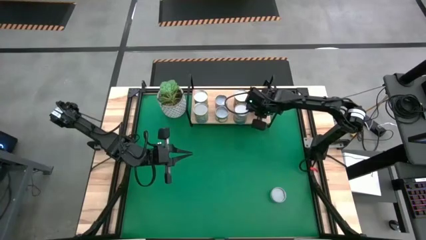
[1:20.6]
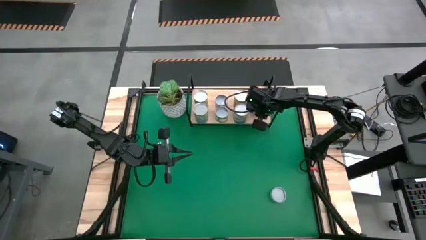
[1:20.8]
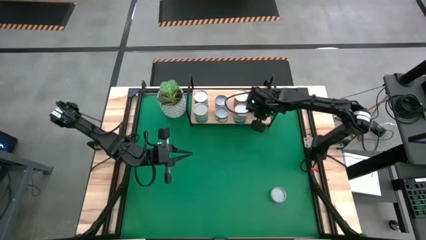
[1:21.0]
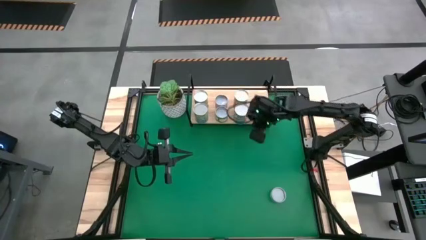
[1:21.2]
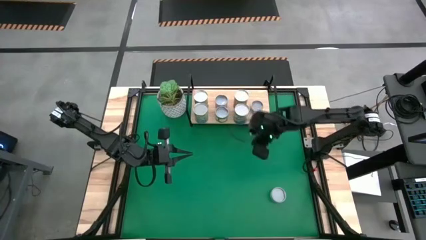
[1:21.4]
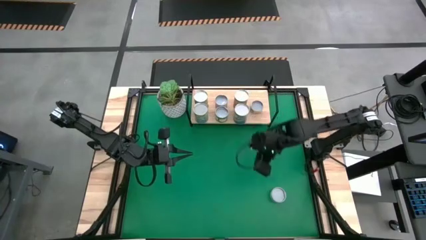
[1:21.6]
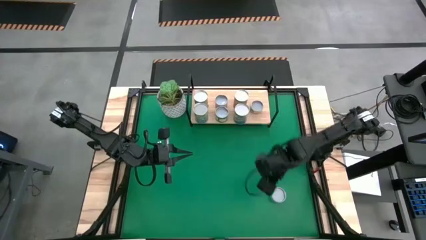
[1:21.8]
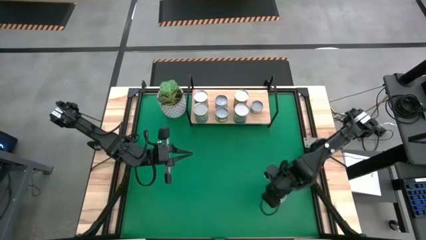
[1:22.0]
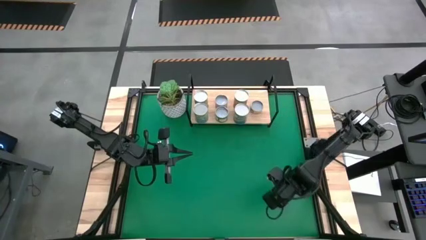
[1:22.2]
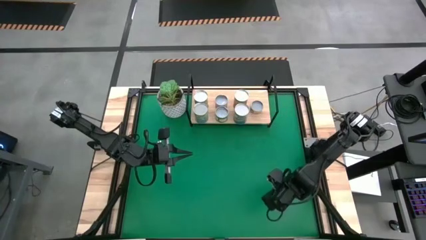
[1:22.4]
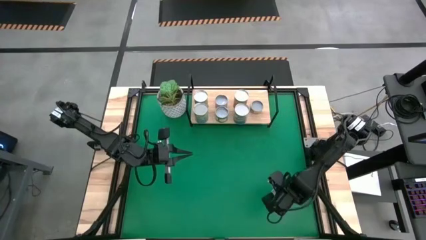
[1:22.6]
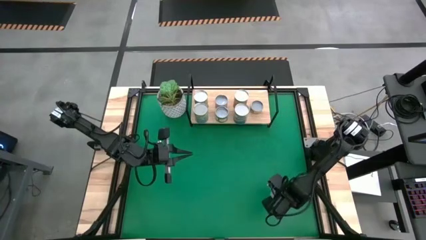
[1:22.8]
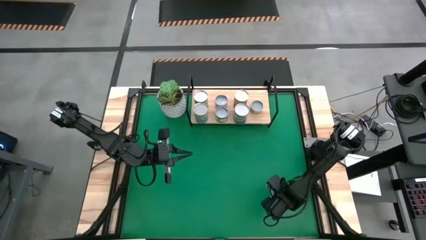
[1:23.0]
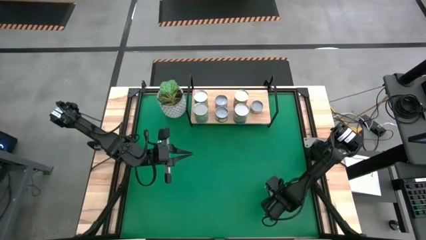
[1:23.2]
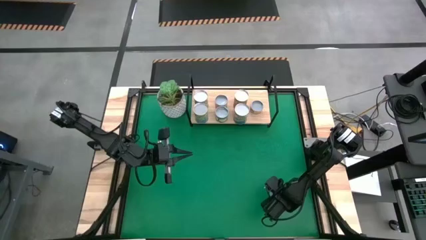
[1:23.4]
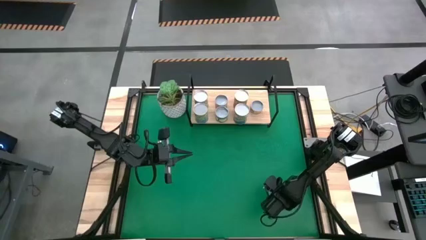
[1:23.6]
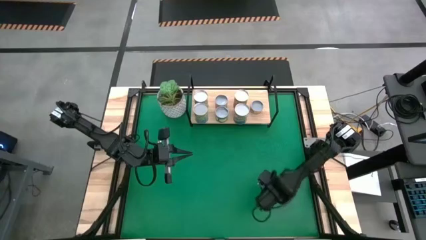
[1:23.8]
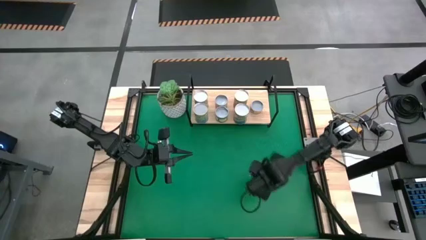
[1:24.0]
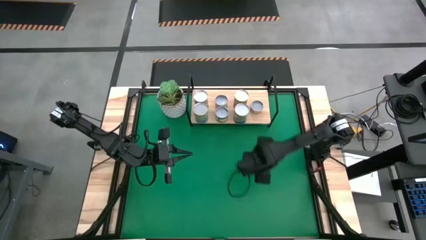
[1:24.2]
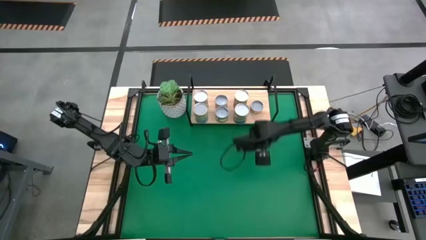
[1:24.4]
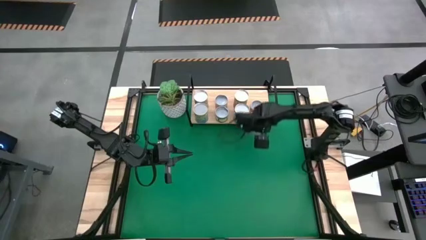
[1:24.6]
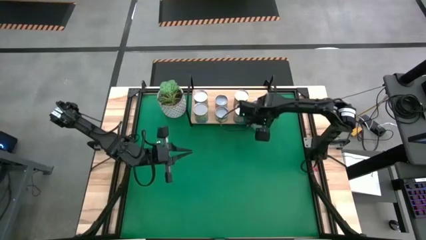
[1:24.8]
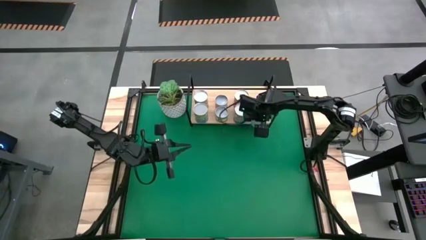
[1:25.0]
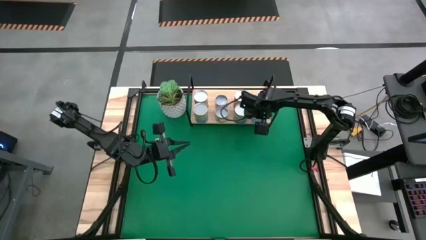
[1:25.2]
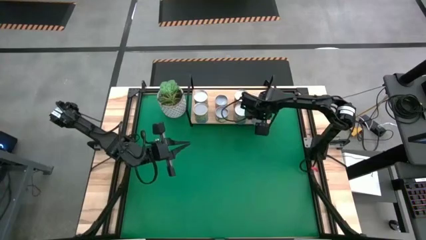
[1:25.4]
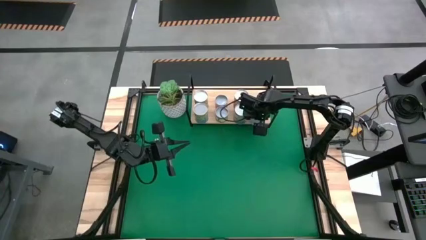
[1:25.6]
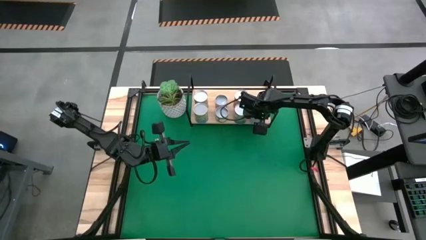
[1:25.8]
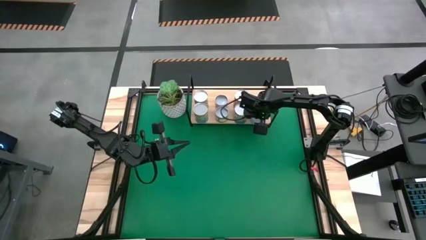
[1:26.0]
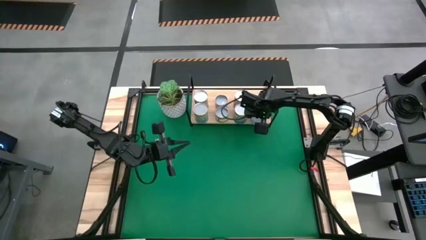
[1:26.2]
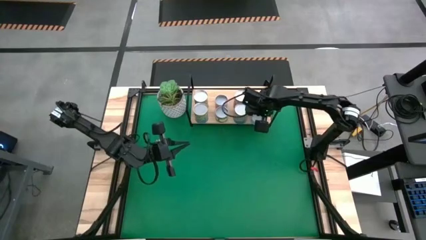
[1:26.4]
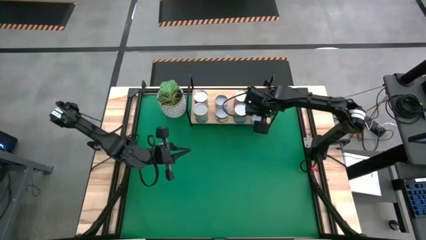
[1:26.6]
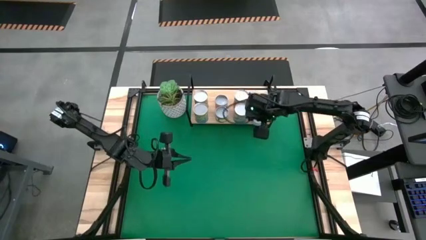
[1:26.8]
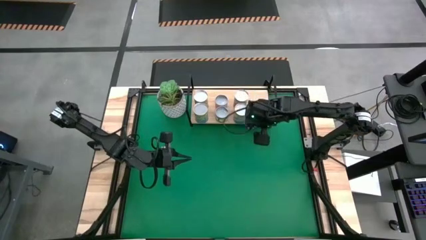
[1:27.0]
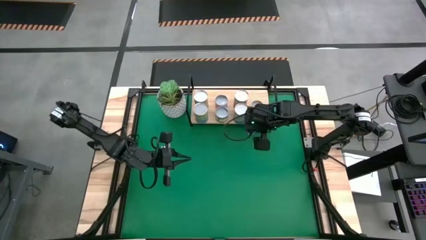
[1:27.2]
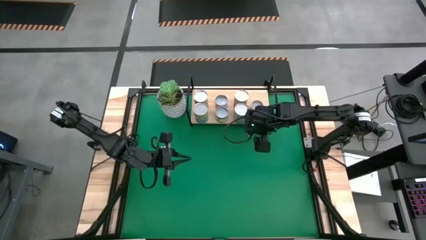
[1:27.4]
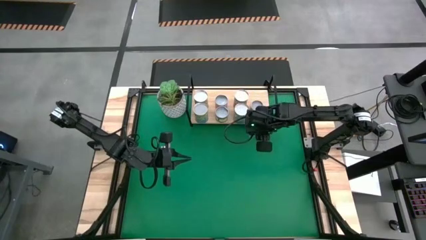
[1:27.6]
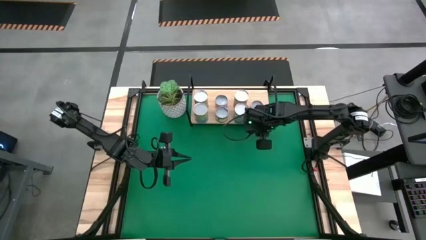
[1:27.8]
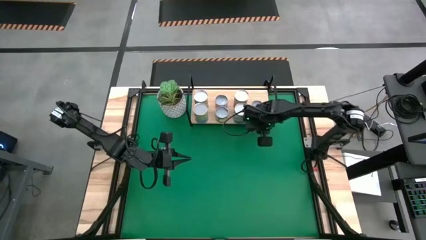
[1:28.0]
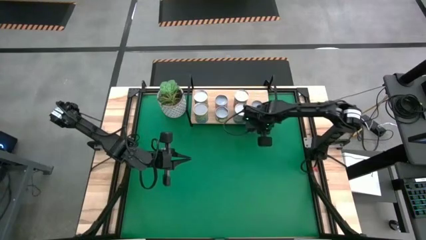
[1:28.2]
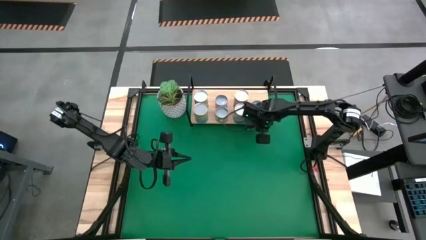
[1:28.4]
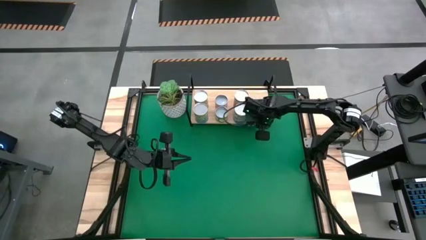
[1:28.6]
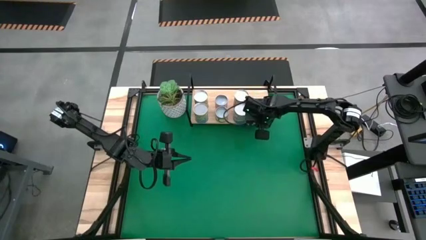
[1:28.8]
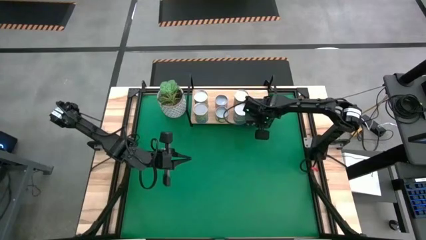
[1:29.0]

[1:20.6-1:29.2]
Task: Pick and place cans onto a shelf
Put the canned salmon on the shelf

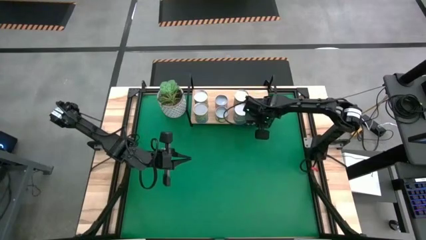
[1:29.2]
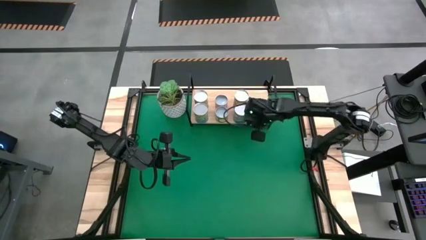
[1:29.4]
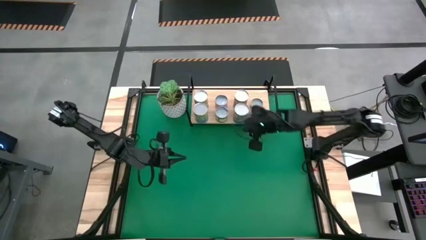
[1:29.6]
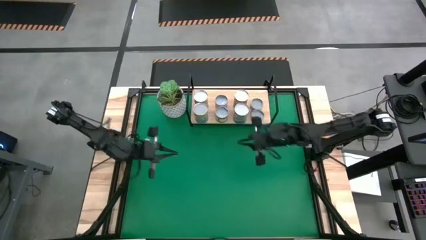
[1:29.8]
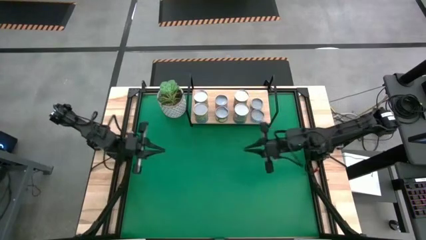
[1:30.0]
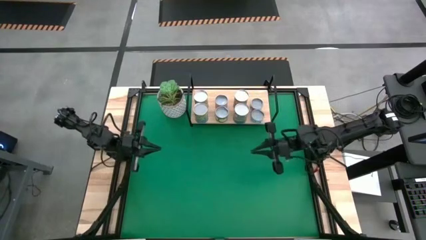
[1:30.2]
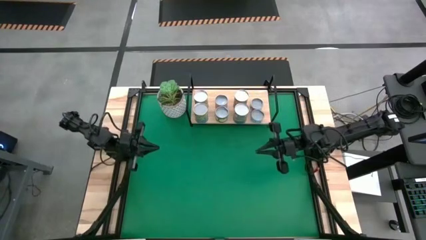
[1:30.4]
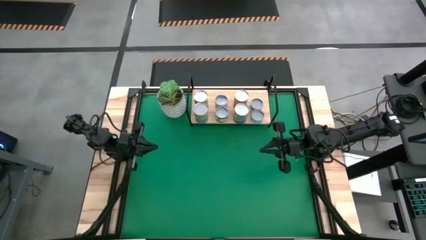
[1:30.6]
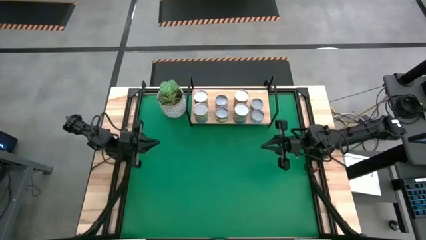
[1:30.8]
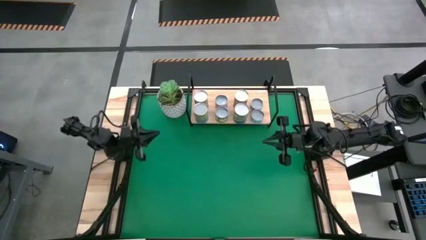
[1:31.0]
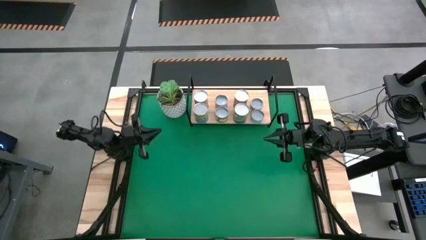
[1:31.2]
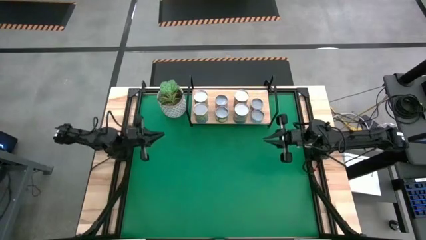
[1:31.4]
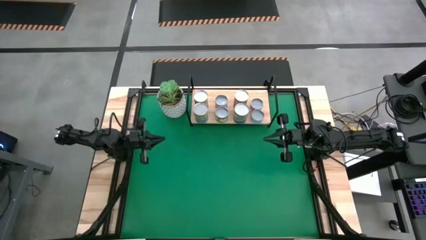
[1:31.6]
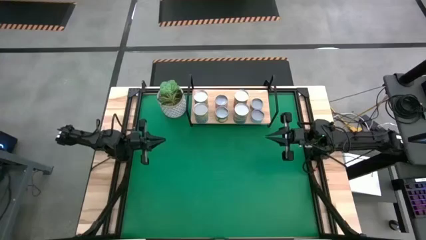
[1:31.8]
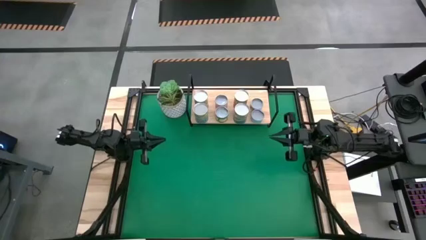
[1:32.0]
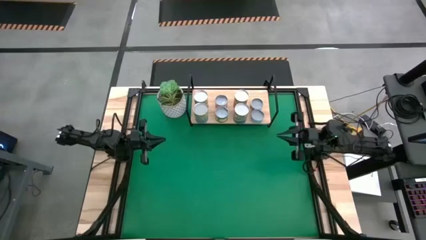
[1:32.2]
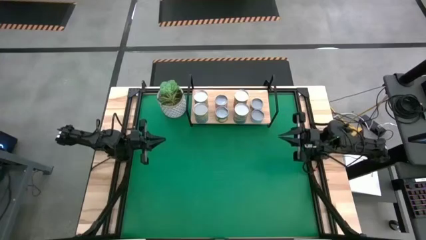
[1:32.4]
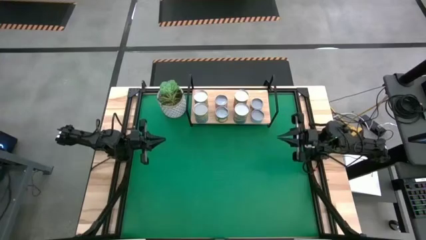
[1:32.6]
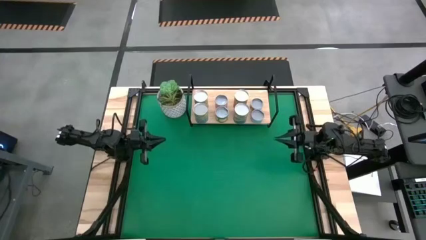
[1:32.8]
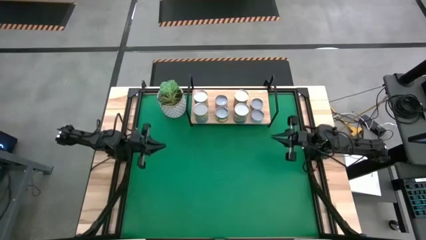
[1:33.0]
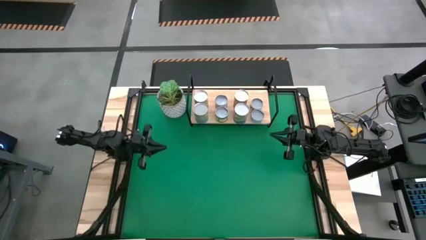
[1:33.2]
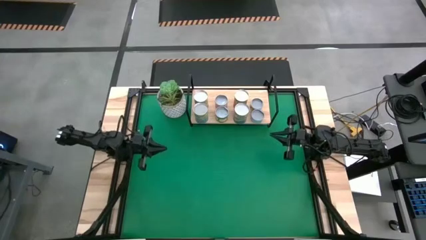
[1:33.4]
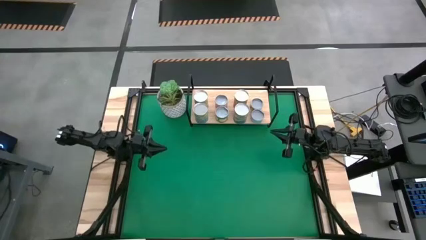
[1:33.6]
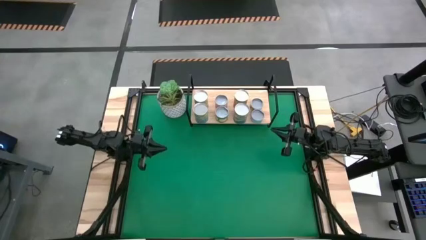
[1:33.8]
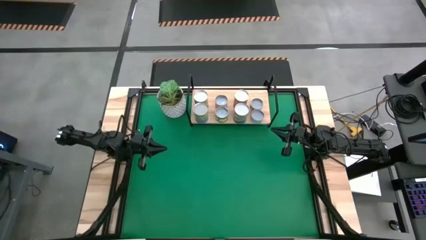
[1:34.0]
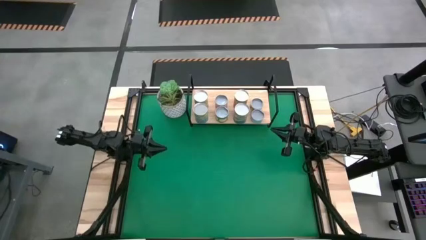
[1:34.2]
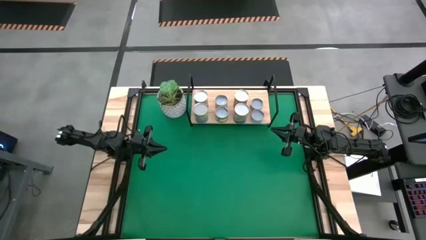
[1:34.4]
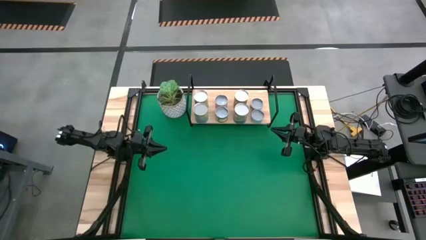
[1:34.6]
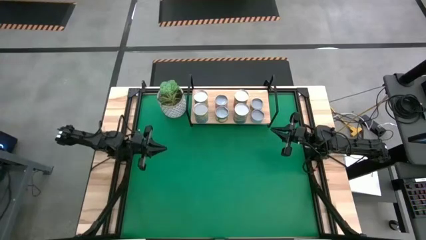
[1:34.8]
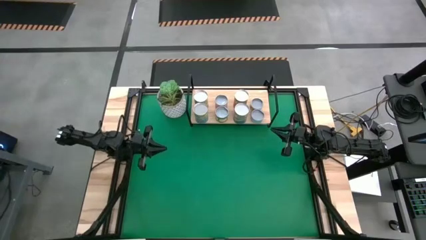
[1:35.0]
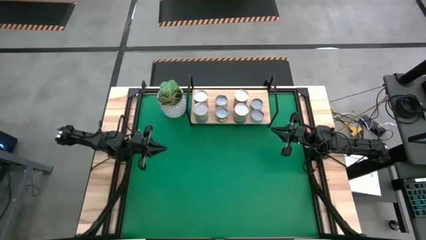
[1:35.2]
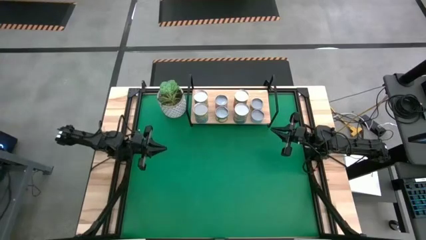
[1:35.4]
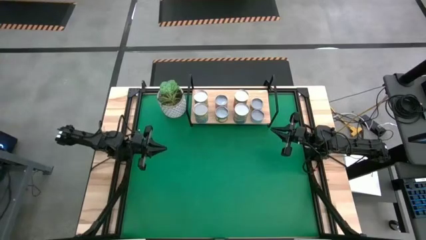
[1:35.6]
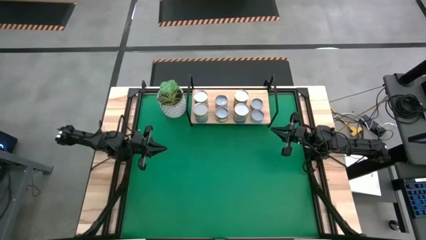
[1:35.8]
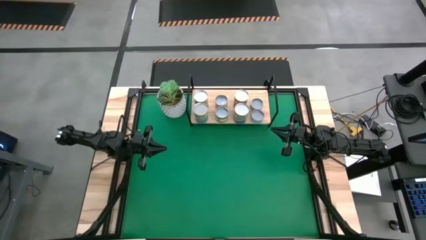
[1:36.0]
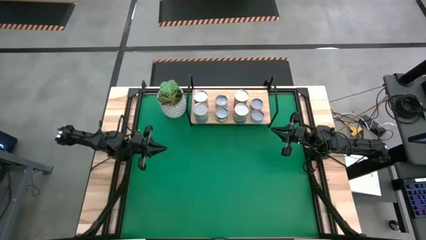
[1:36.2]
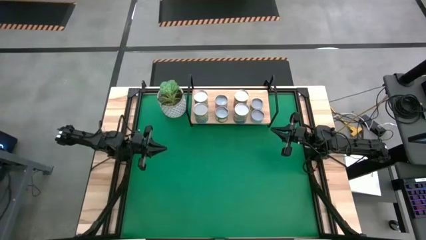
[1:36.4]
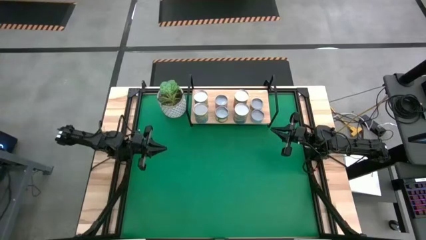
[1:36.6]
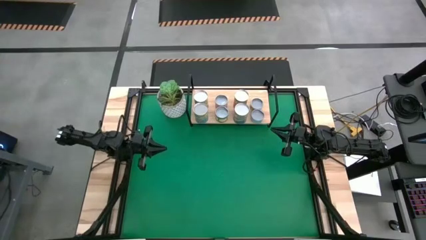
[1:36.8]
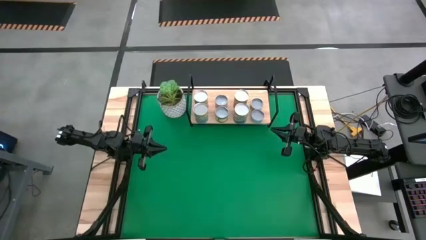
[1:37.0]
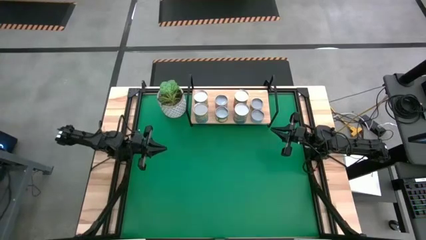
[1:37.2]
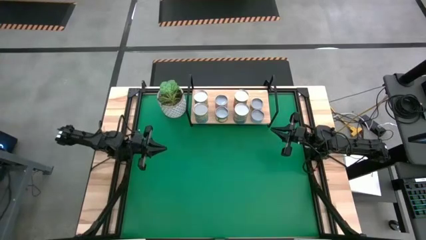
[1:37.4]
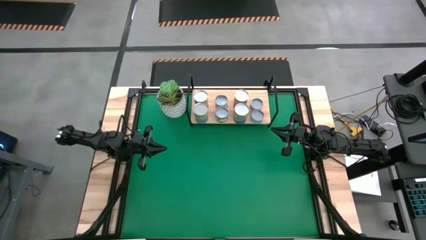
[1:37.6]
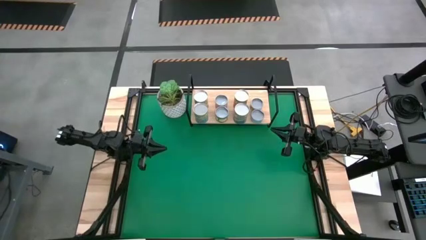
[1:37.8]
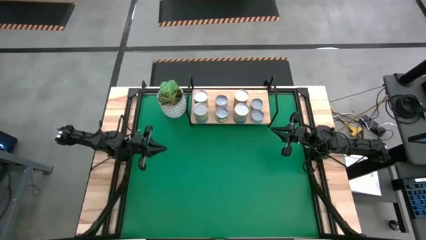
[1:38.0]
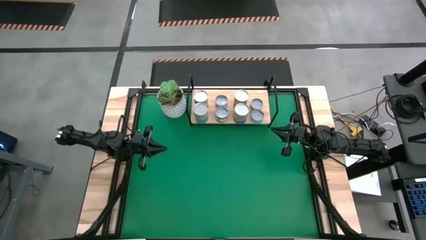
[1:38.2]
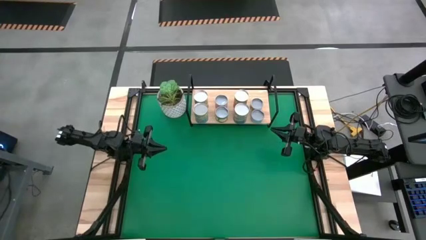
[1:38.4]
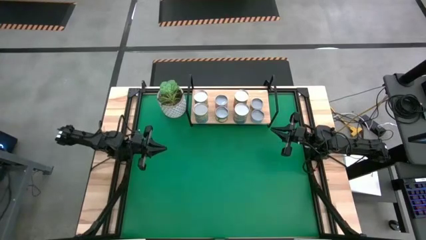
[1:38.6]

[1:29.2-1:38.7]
Return to Home Position
